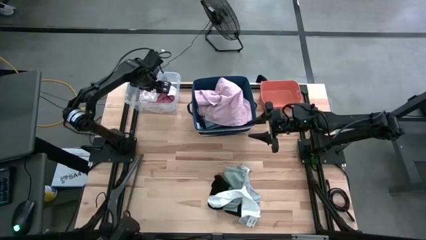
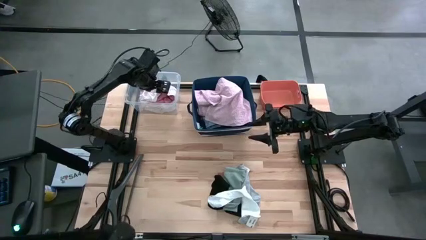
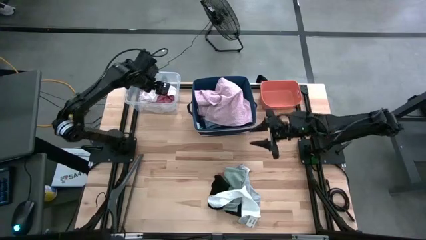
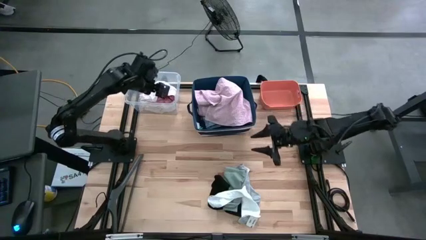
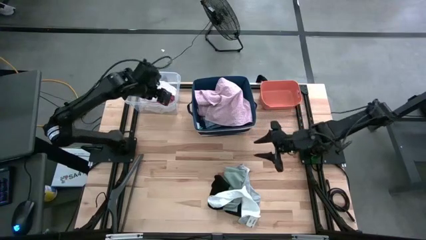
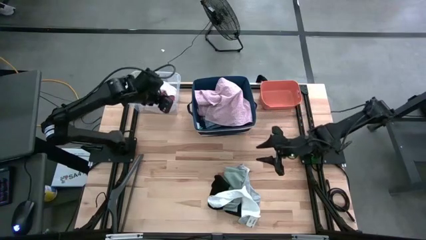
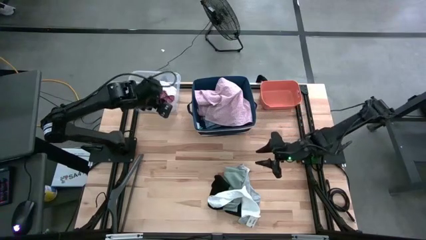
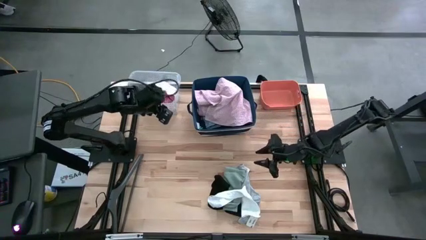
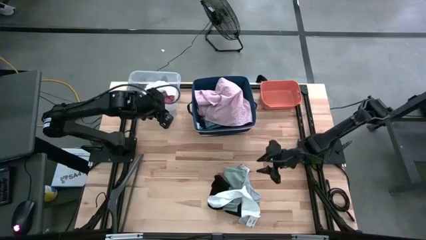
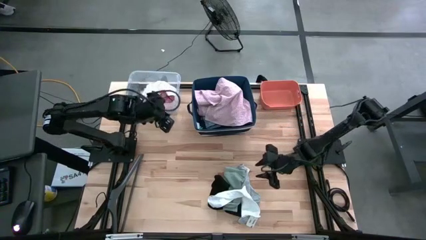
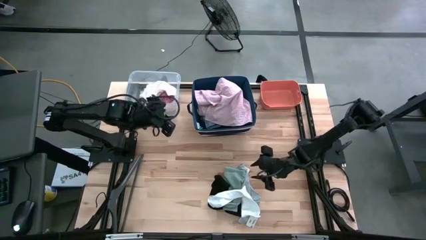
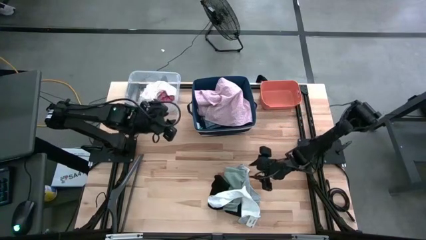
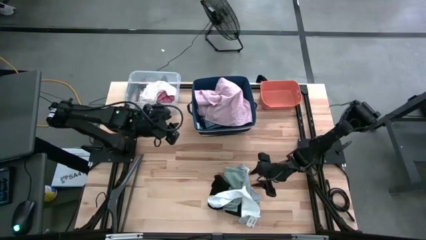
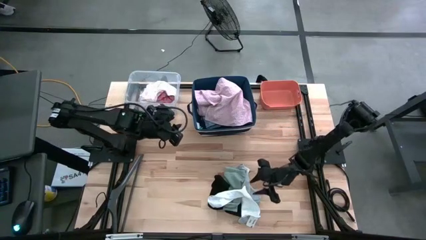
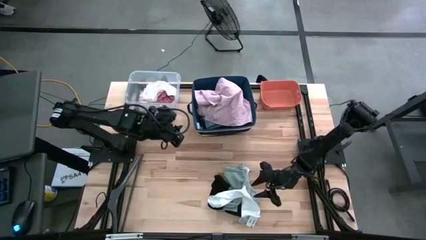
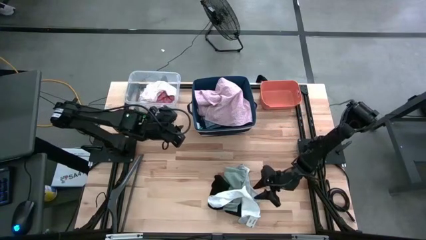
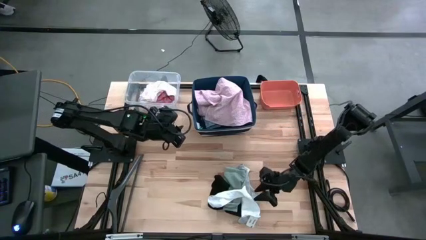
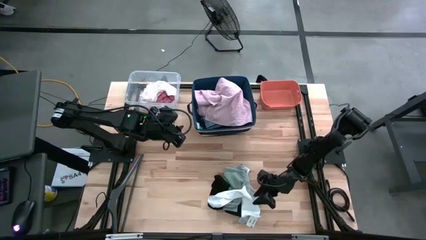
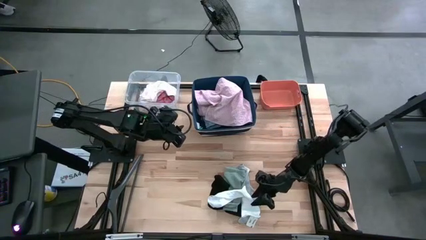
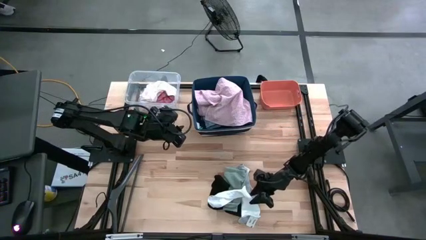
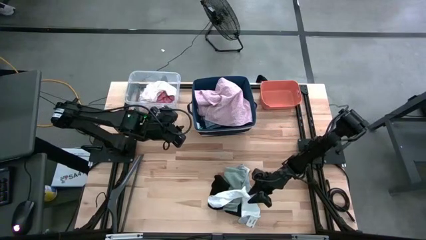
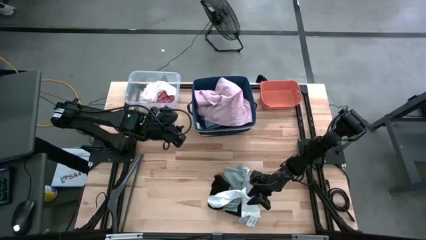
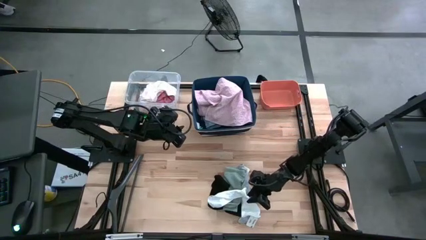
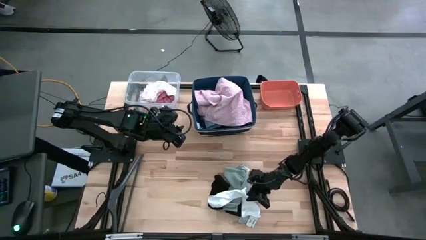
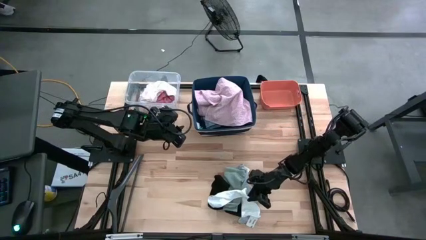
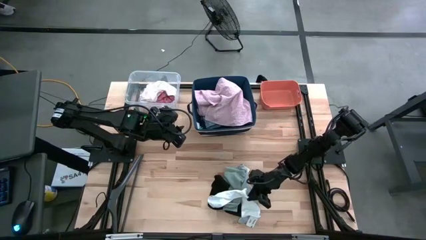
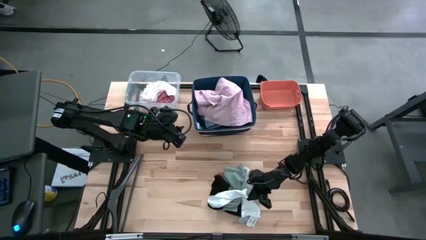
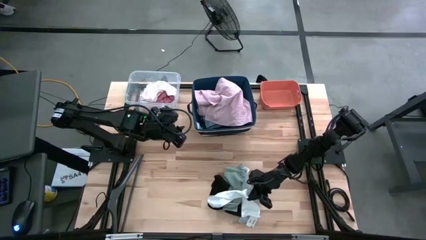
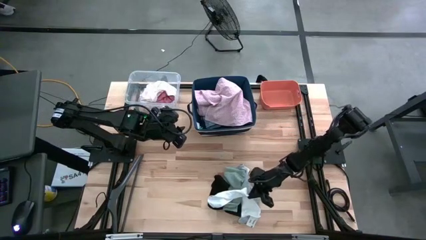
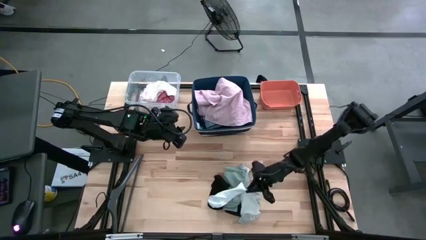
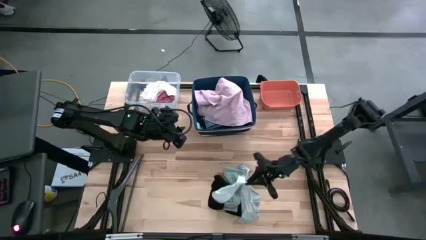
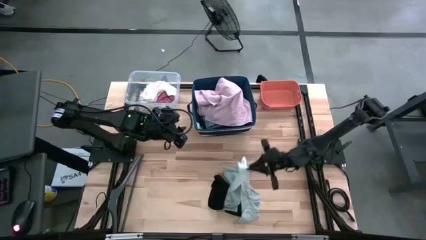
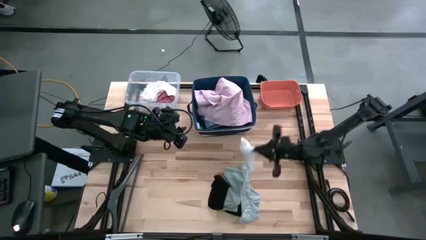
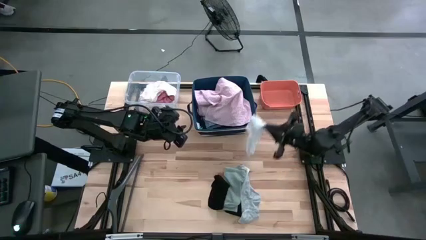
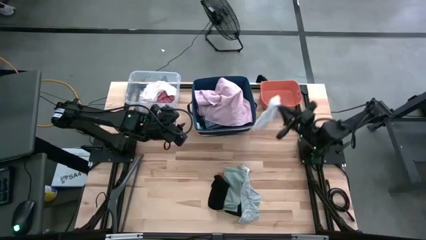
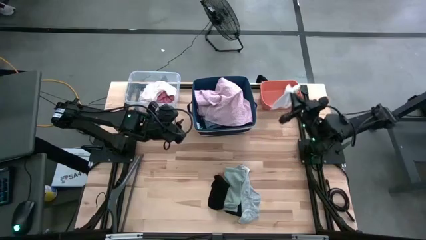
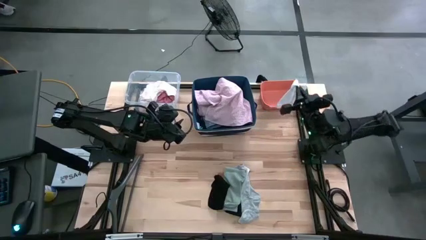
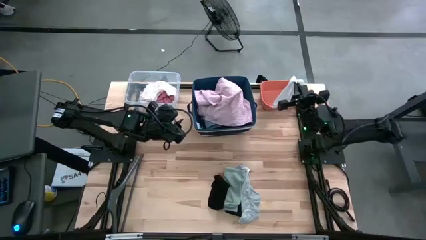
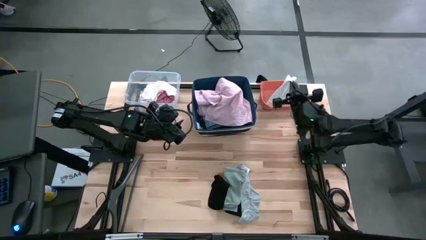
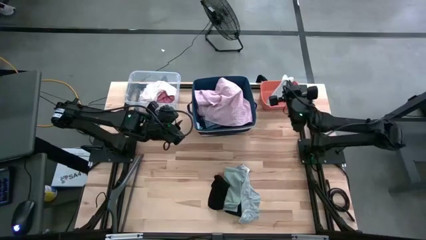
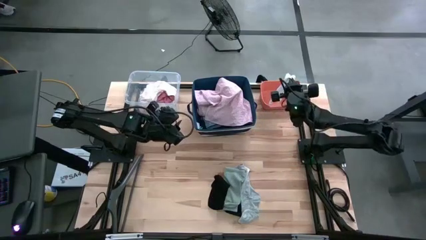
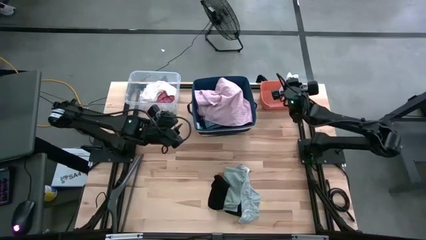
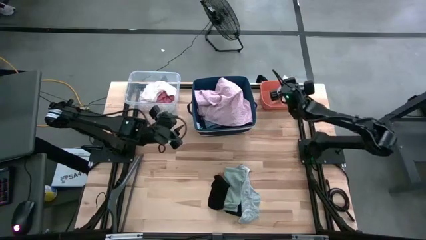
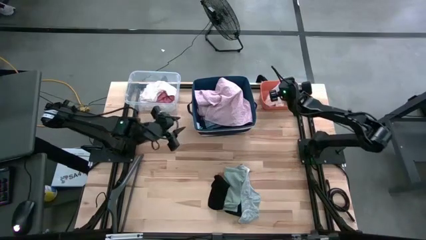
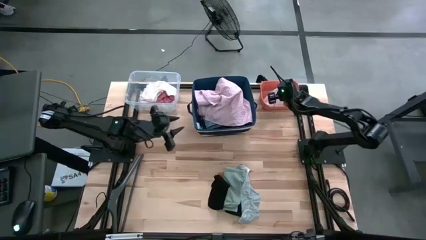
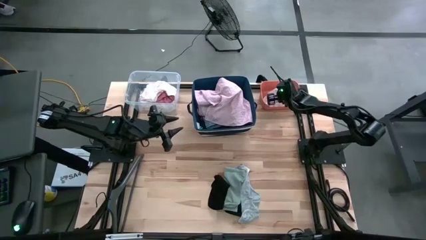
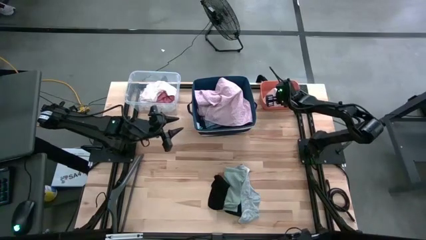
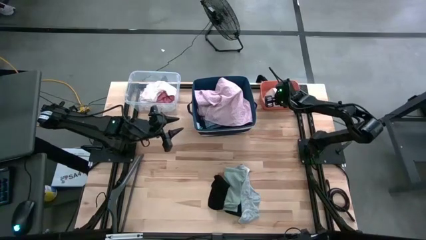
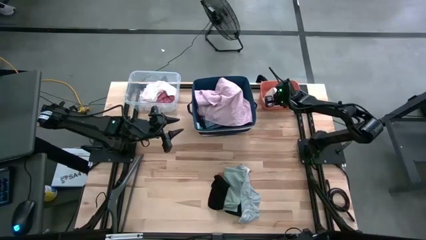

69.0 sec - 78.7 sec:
Task: Pick & Place Cloths
Put the white sock into the orange bin

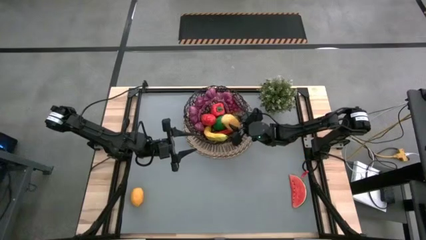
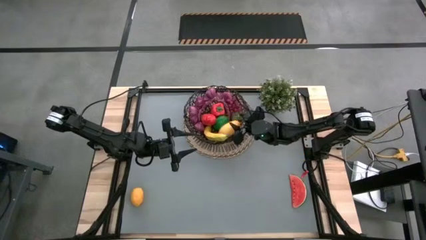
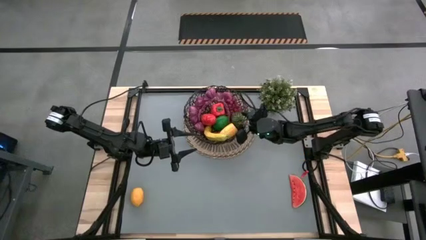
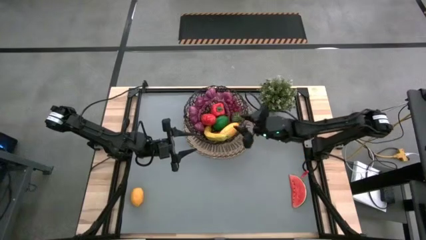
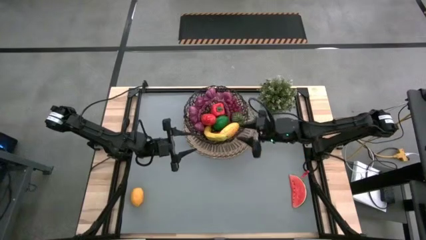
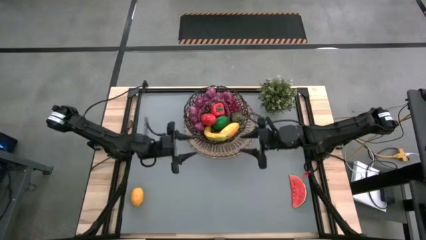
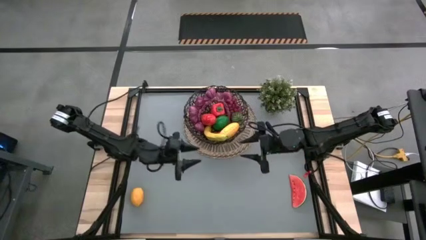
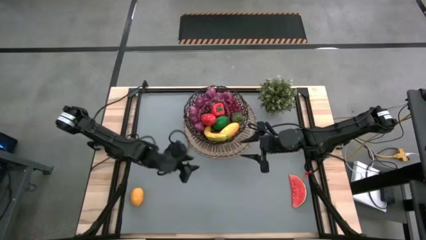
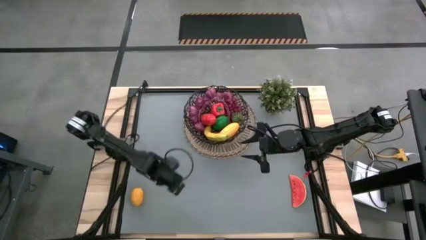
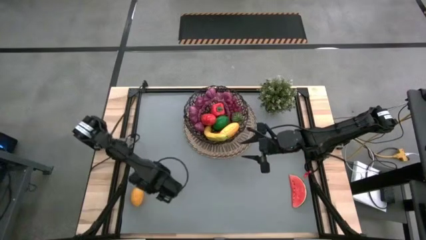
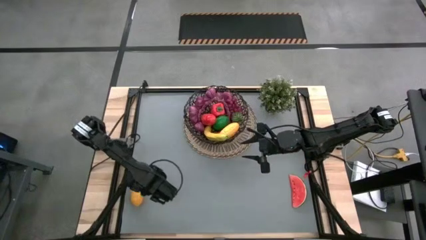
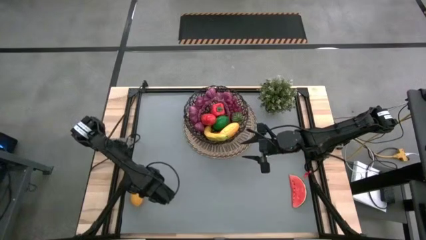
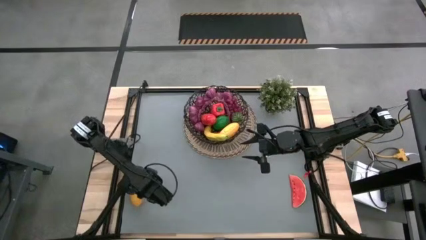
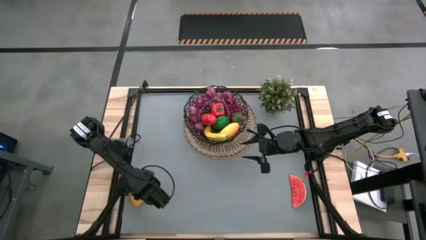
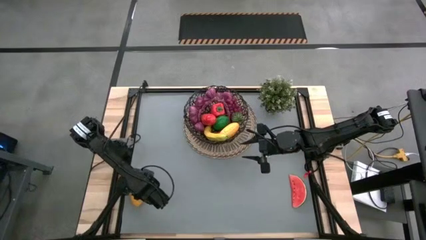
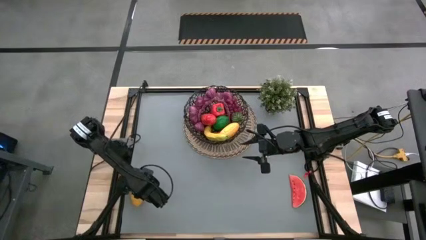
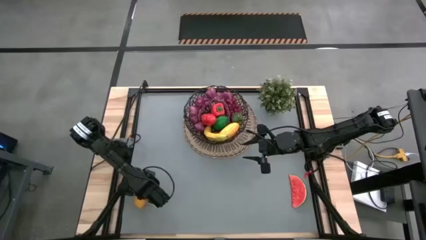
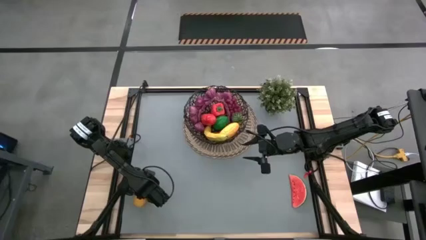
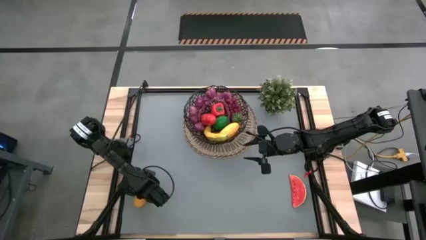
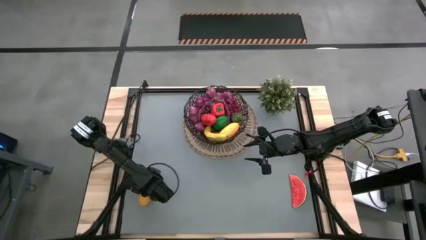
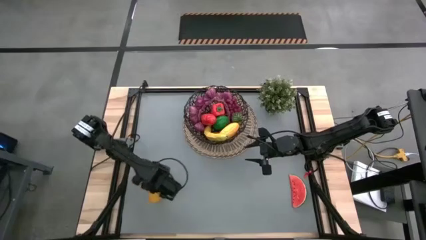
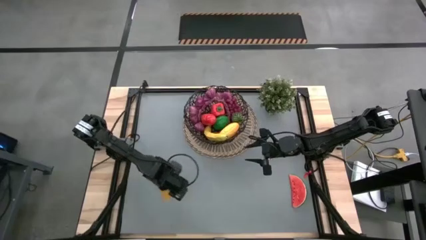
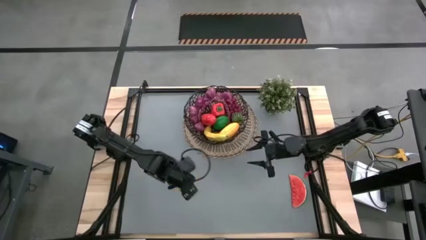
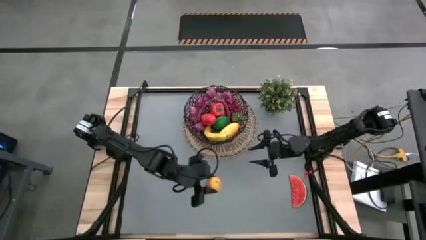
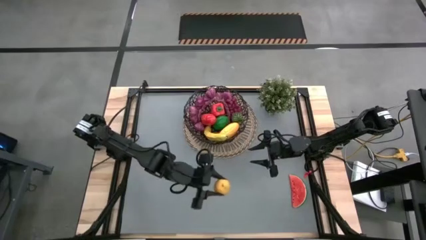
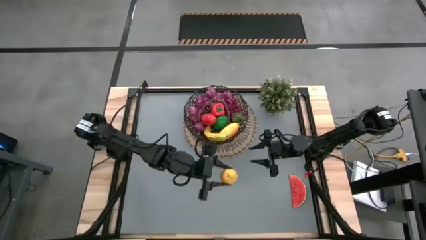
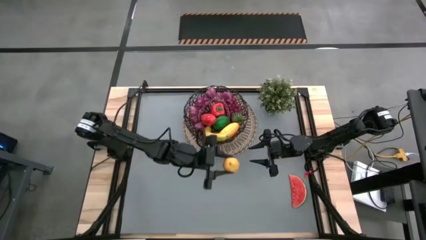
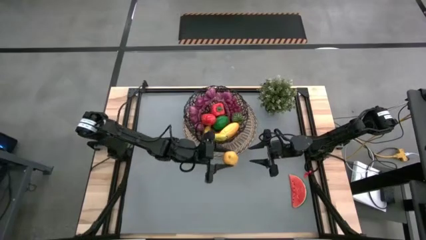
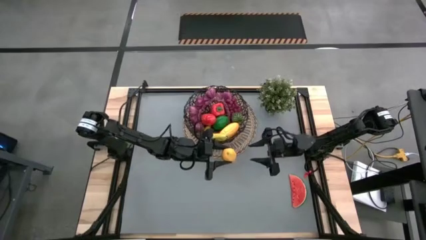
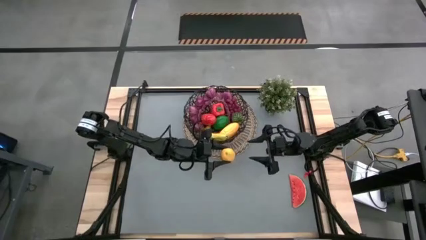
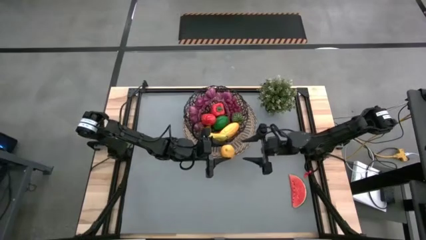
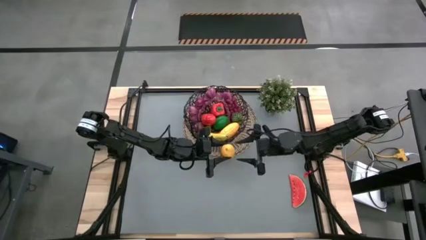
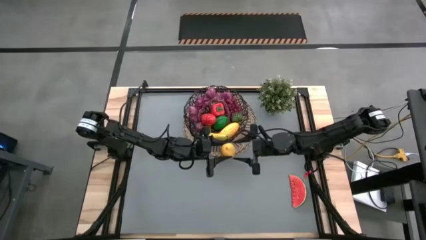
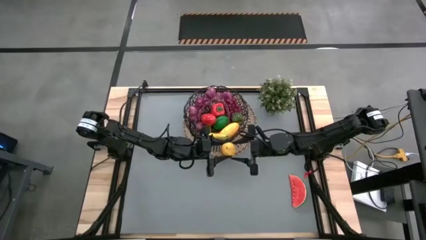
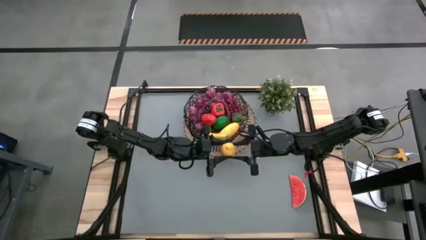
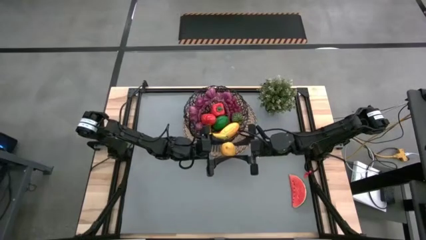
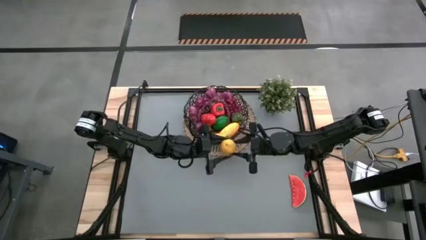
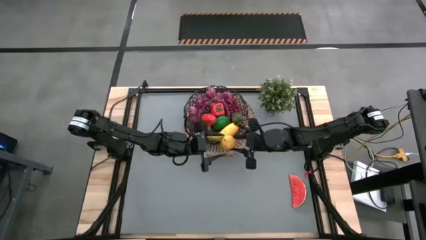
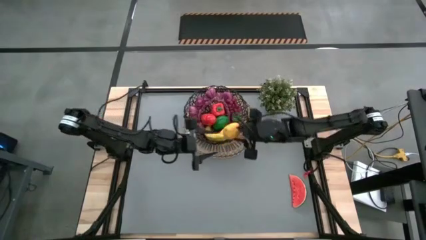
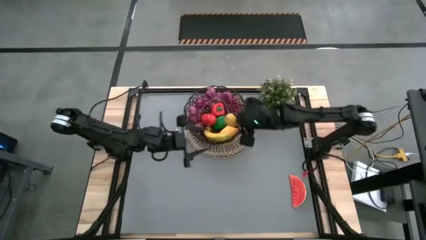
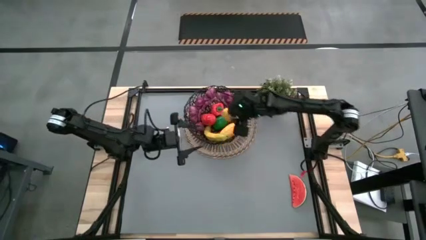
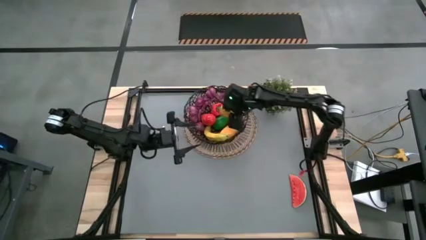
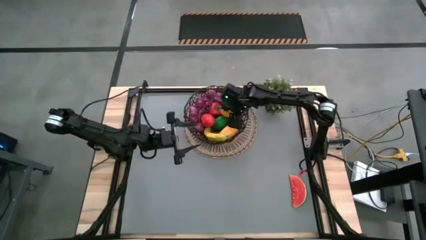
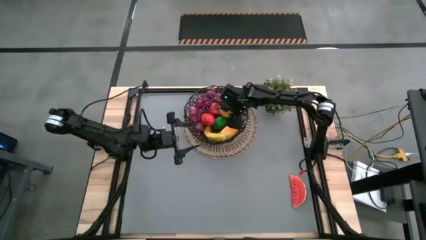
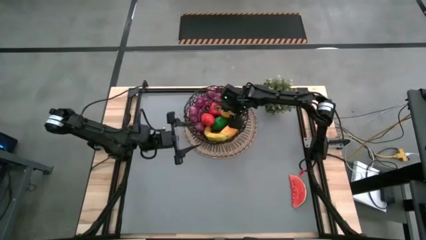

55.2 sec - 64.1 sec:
Task: Build produce basket
Put the yellow lemon into the basket
